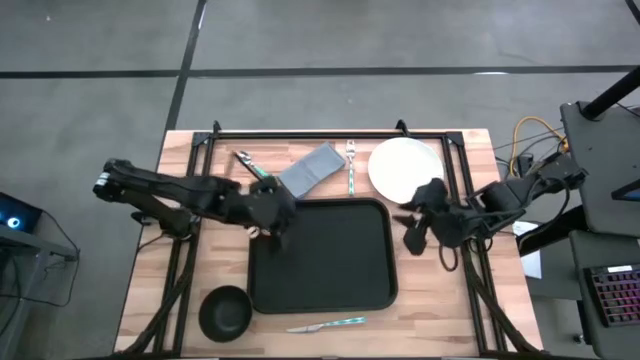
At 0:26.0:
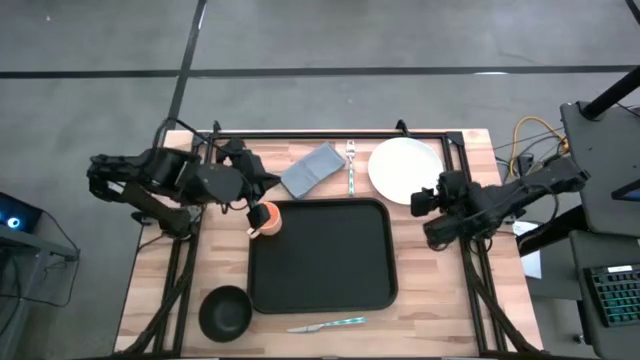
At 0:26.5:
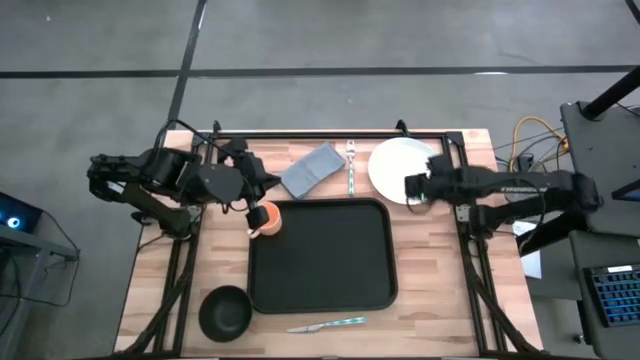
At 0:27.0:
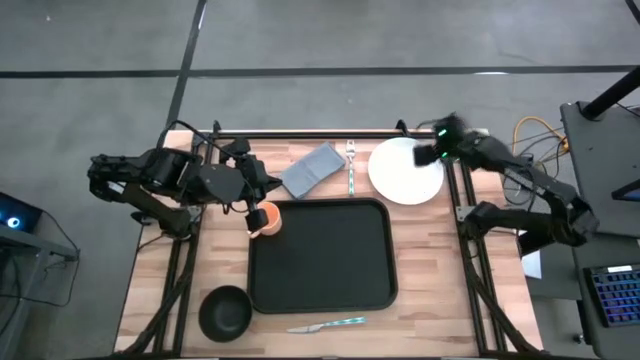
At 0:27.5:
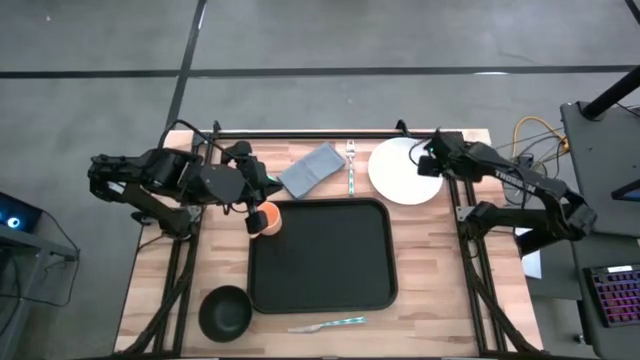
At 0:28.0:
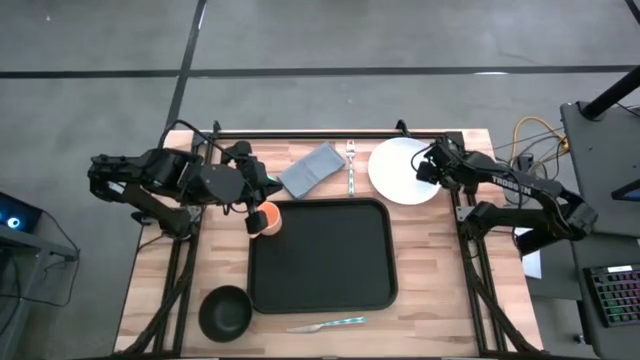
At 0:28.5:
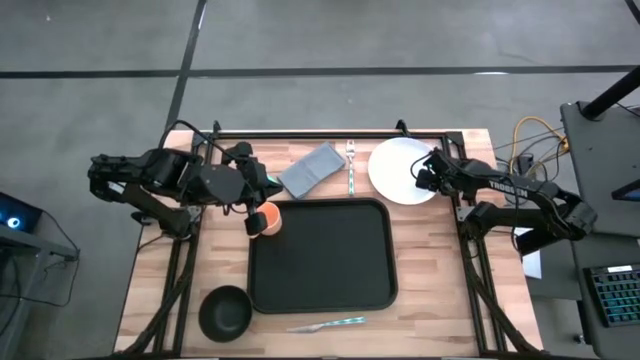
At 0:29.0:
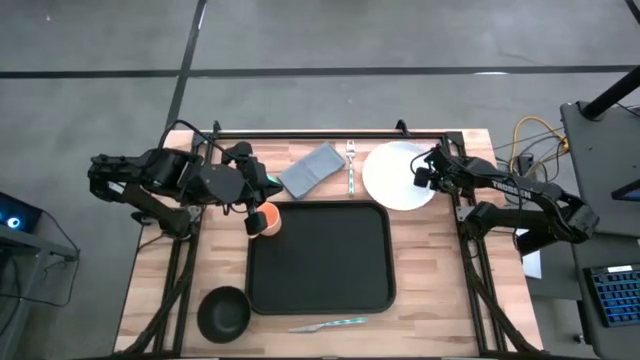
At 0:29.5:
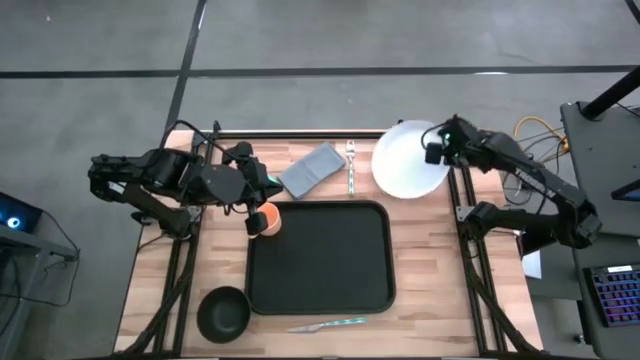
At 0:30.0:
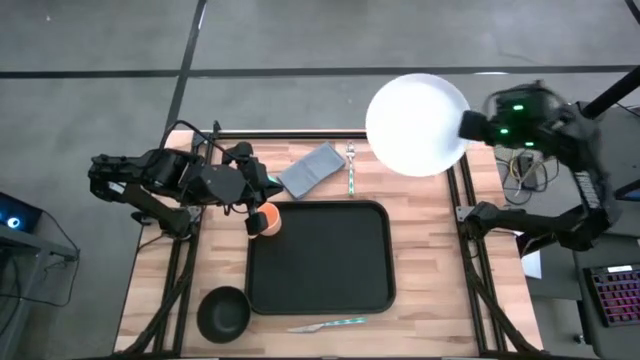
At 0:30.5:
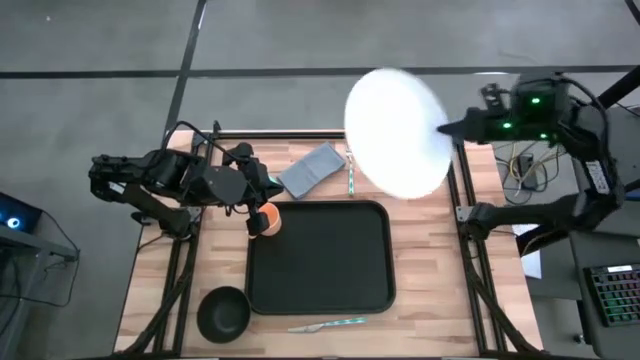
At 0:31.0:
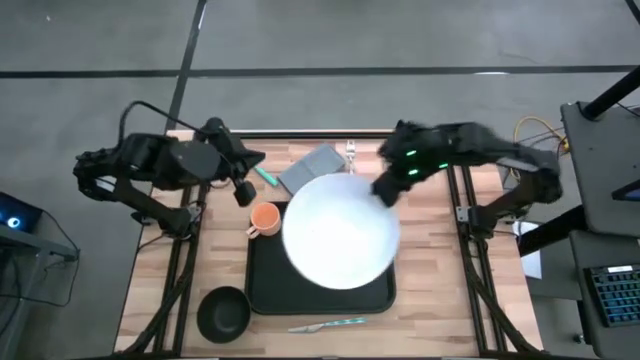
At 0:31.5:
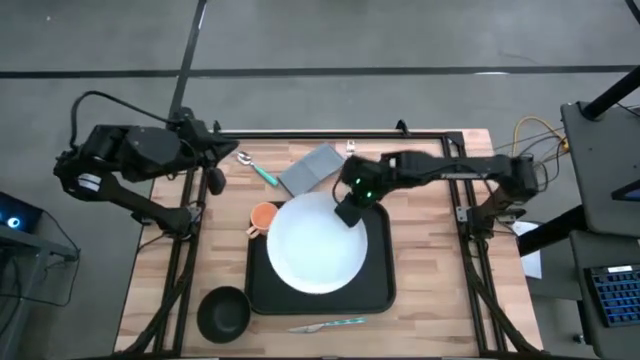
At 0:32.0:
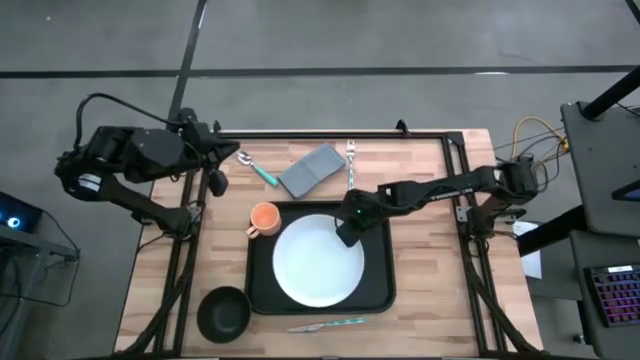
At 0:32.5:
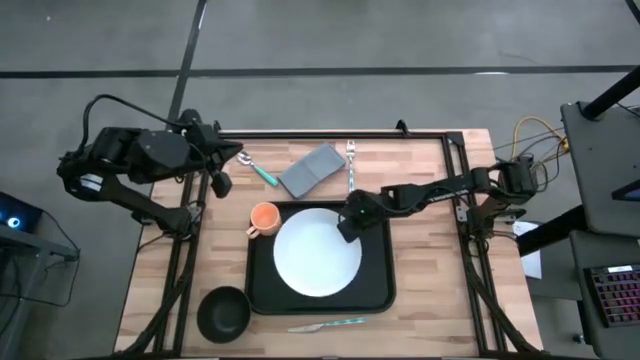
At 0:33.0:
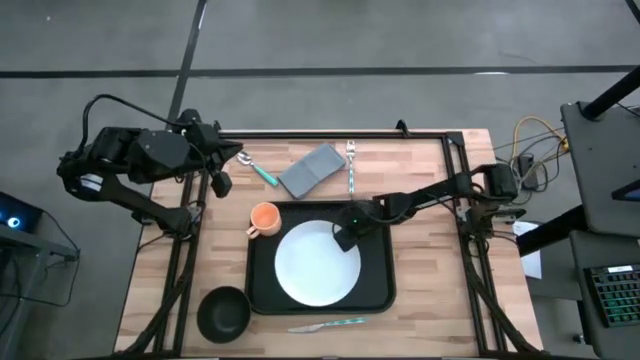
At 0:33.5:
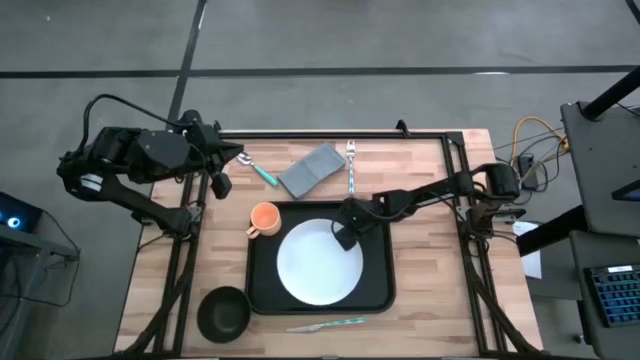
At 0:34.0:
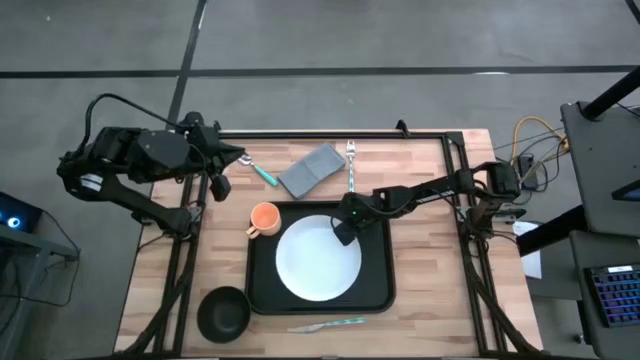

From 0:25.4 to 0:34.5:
Task: Set up tray
Put the plate on the tray

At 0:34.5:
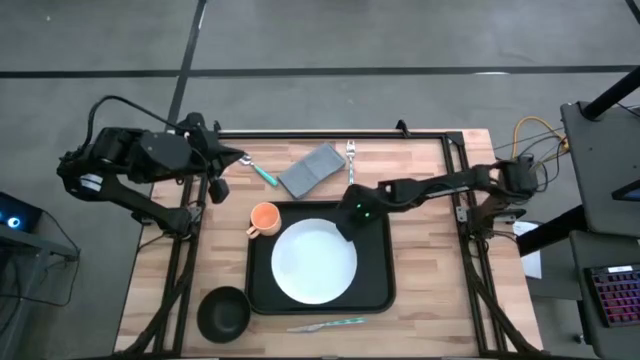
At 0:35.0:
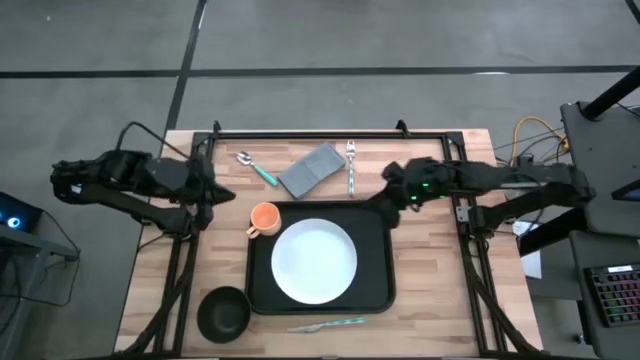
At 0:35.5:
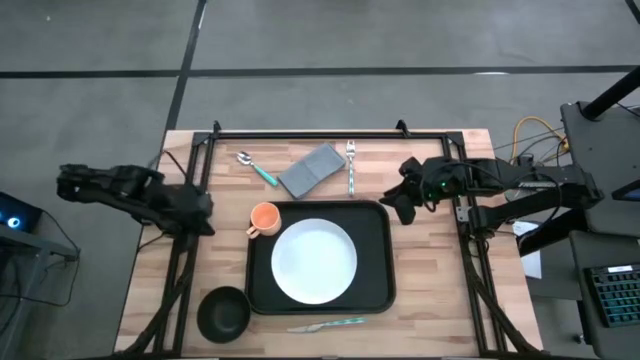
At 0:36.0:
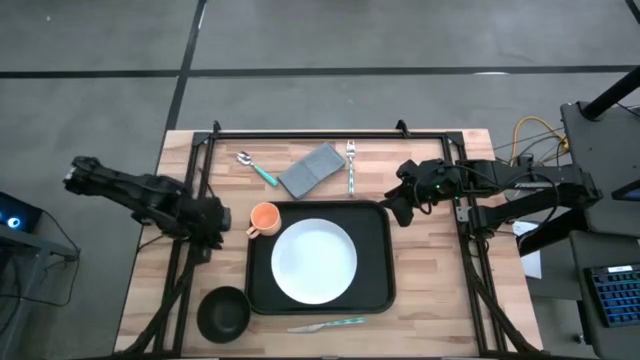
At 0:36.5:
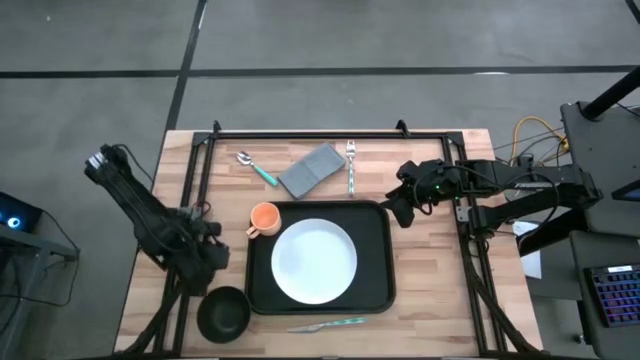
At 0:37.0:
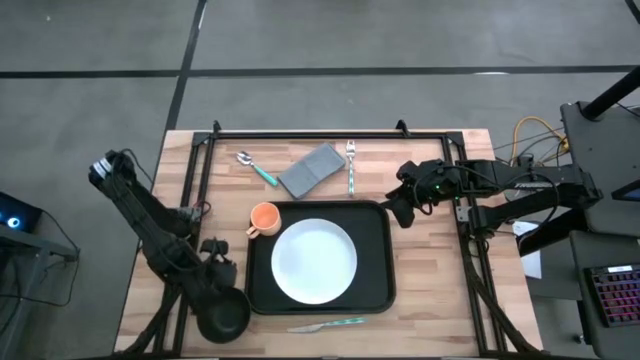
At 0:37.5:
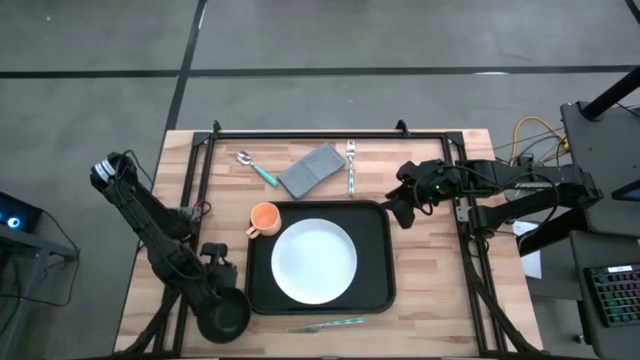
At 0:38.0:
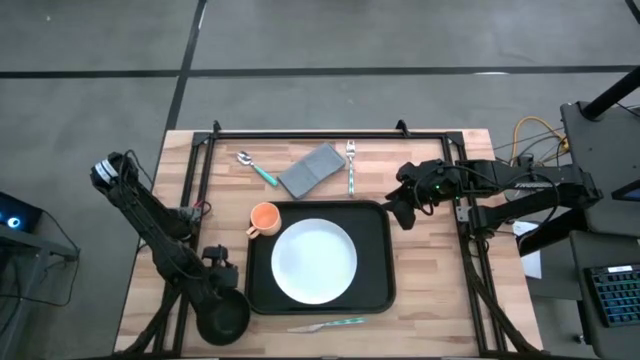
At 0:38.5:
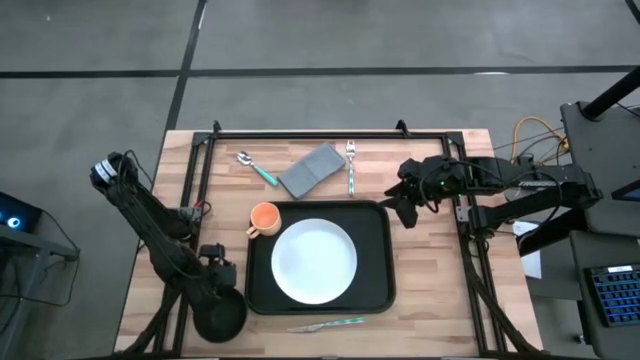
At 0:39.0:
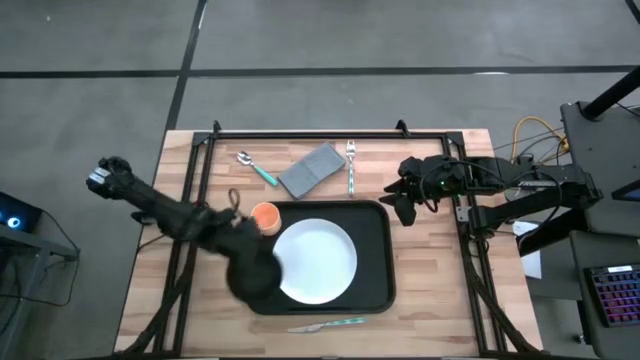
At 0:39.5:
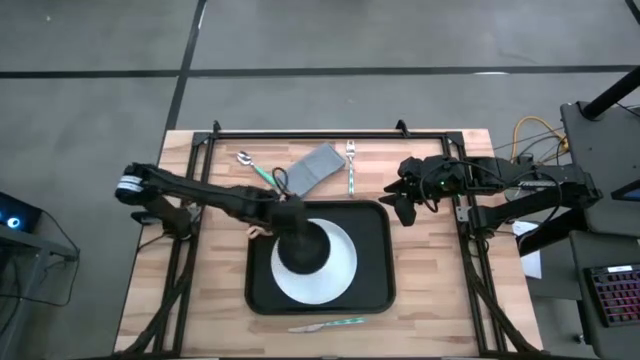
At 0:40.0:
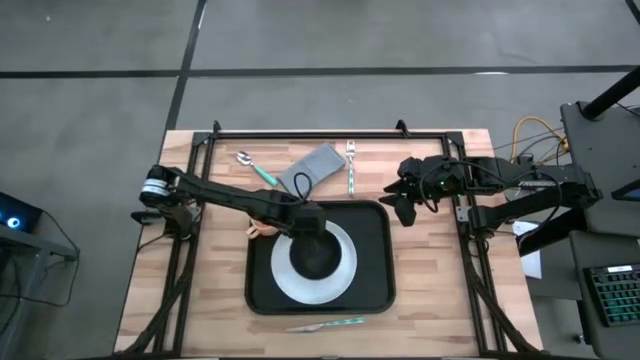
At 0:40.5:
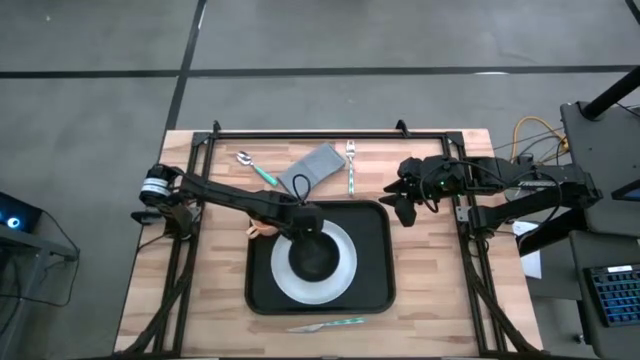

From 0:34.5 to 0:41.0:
Put the bowl on the tray

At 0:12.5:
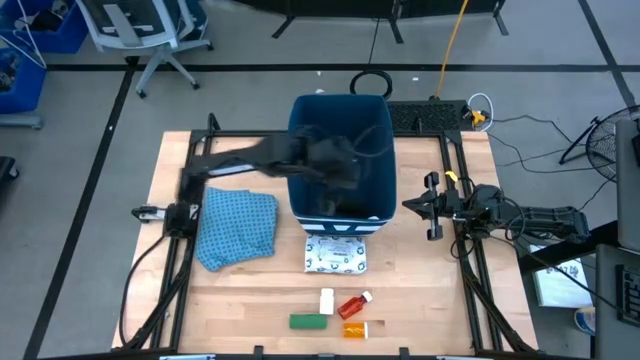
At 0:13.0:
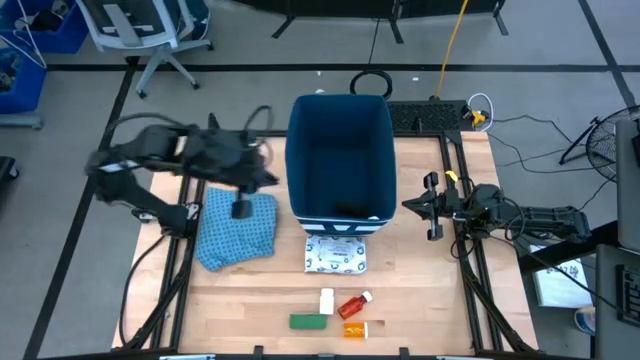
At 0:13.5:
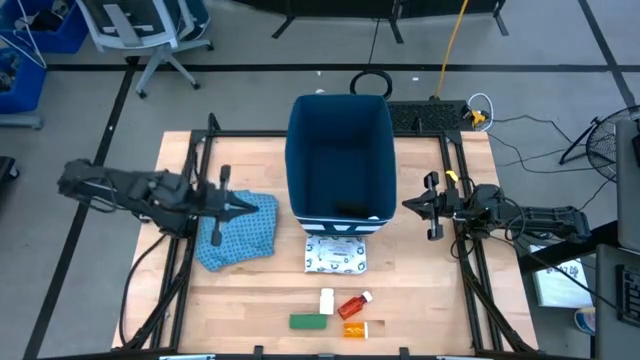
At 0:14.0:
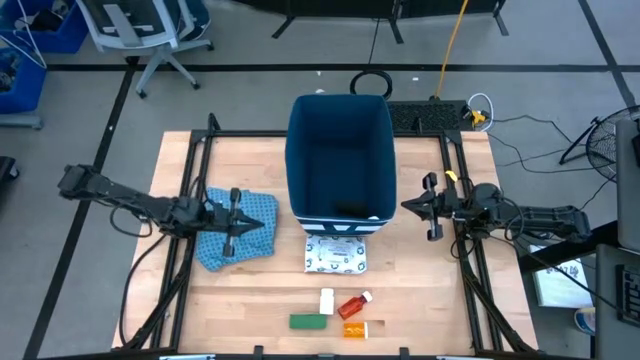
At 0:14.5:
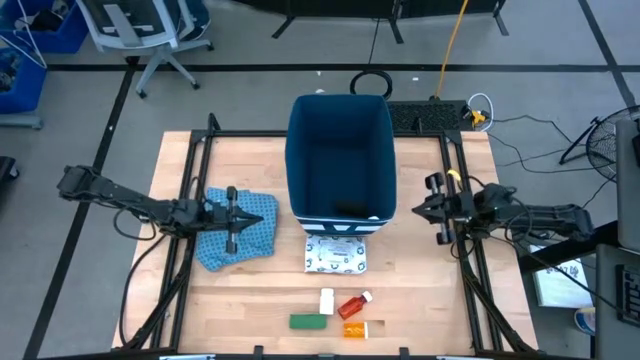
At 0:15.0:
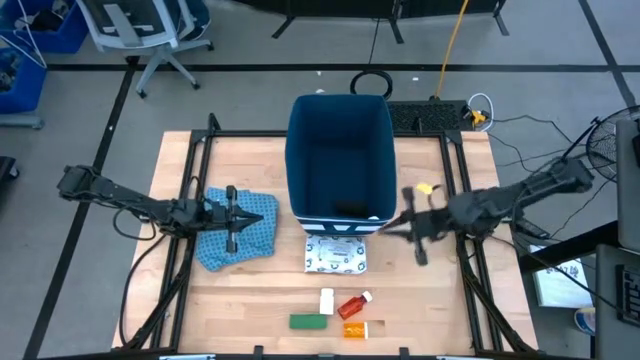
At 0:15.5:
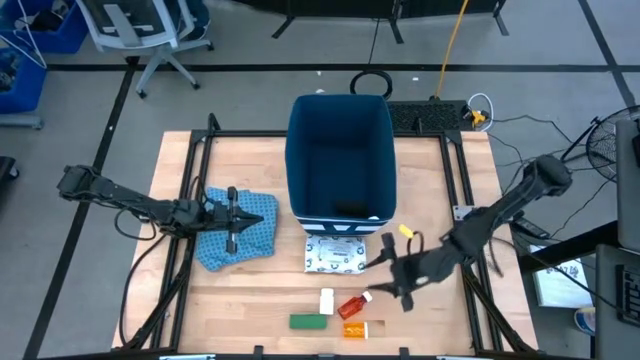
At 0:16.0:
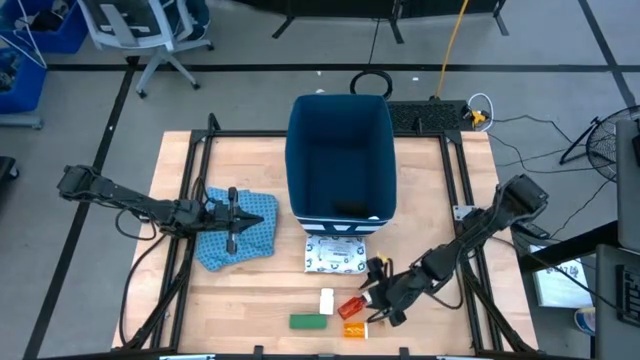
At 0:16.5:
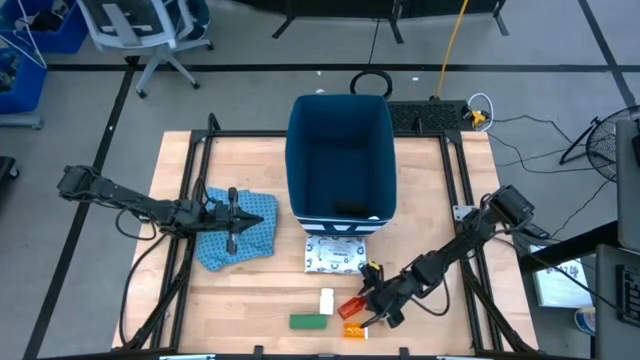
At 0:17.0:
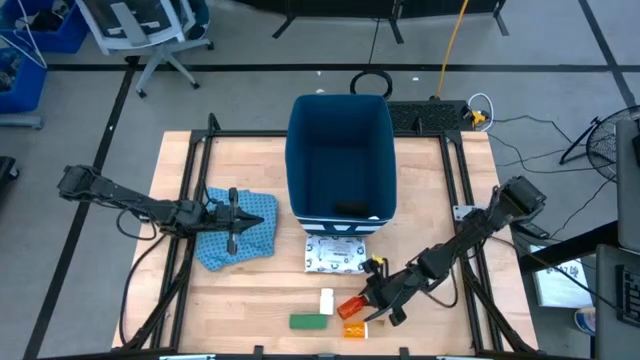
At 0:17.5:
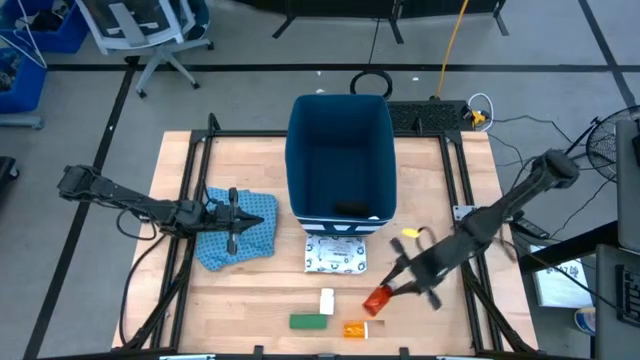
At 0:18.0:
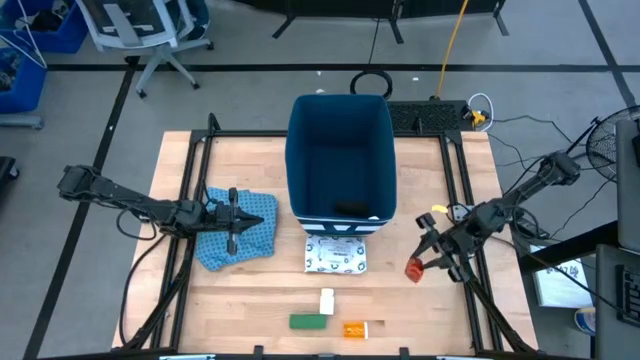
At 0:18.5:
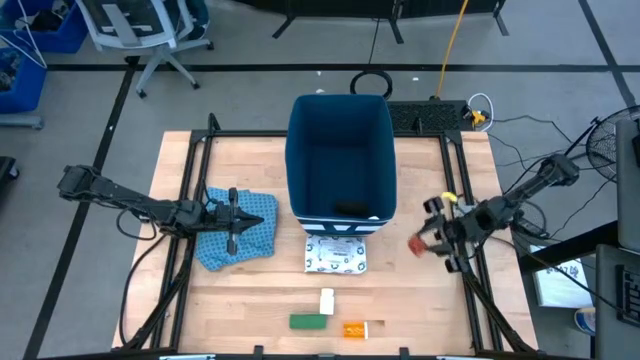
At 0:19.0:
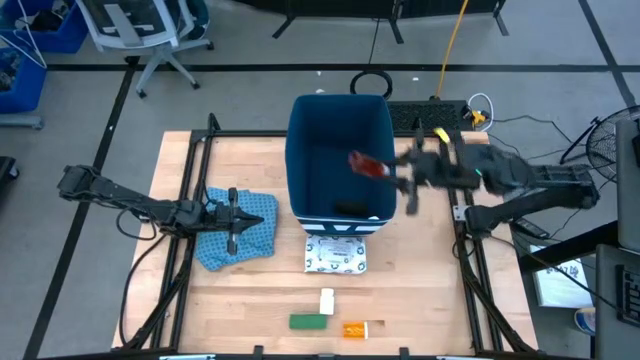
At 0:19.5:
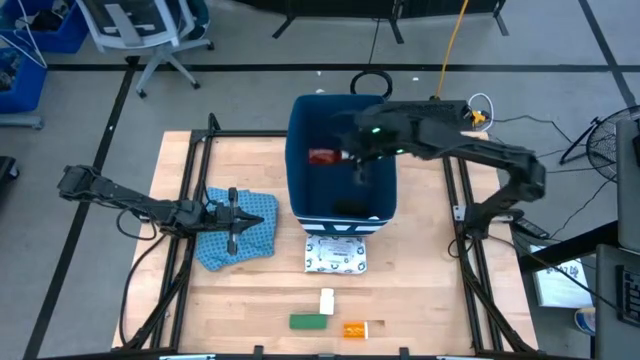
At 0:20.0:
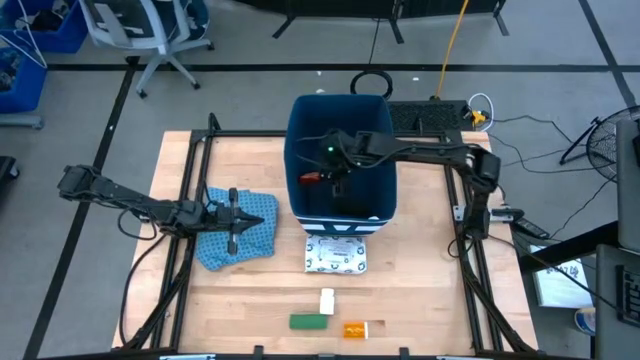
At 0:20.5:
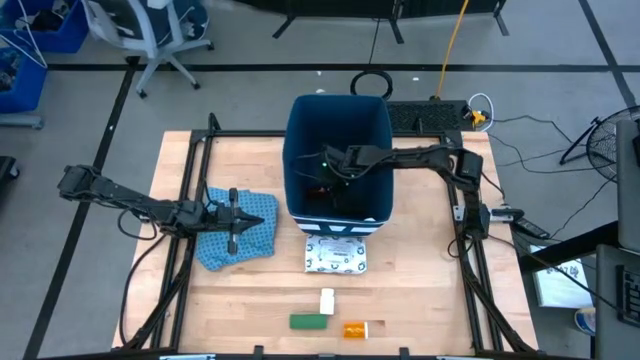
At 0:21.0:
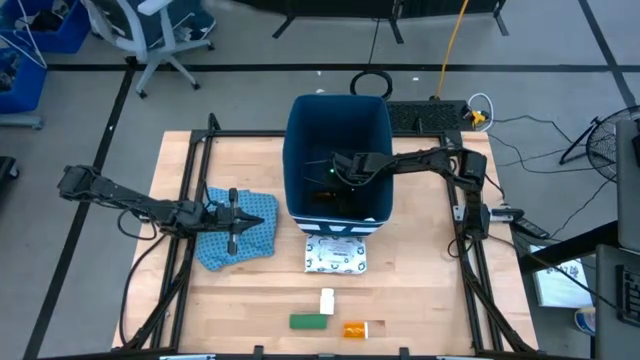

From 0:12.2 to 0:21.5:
Task: Pick & place medical supplies in basket/bin
Put the red pill bottle into the blue bin
